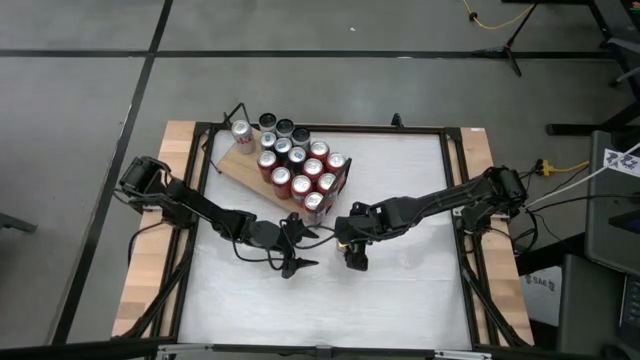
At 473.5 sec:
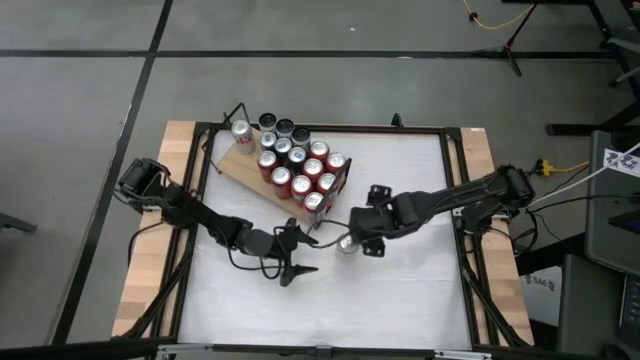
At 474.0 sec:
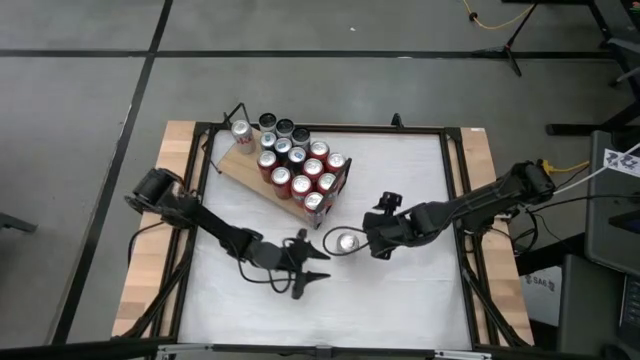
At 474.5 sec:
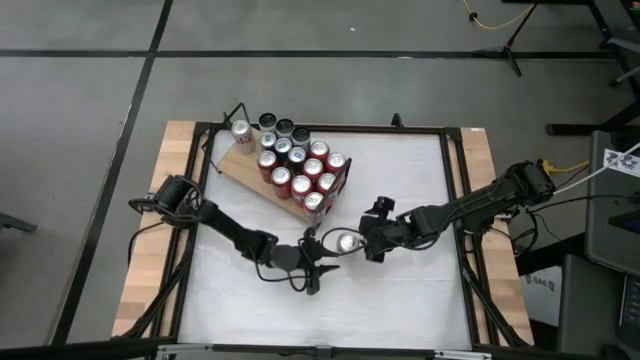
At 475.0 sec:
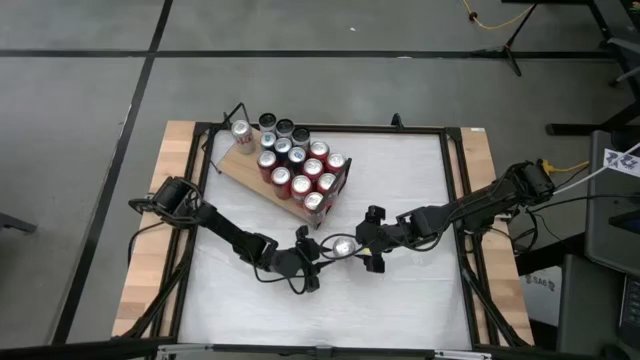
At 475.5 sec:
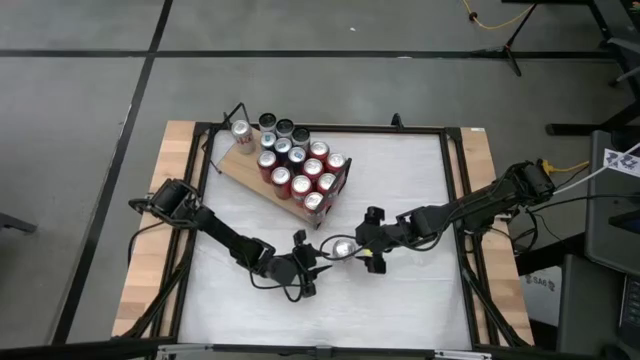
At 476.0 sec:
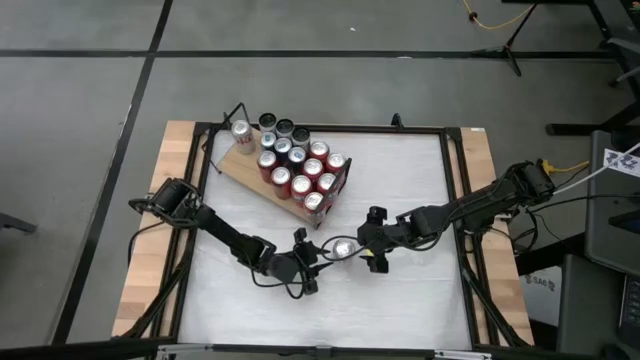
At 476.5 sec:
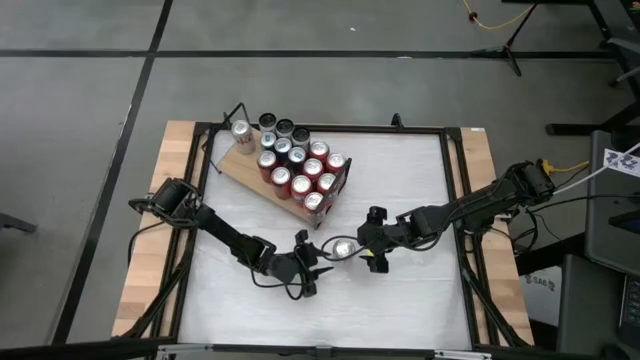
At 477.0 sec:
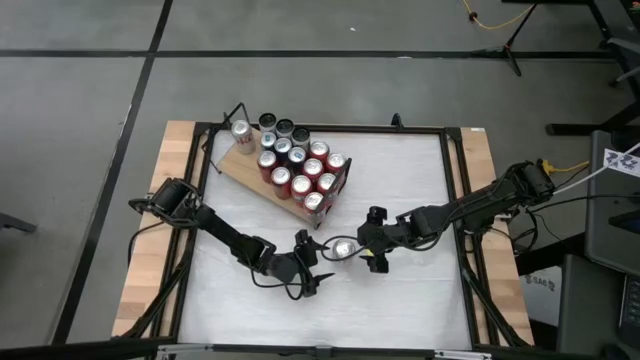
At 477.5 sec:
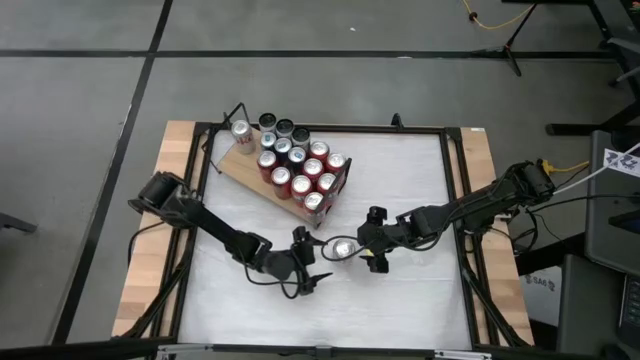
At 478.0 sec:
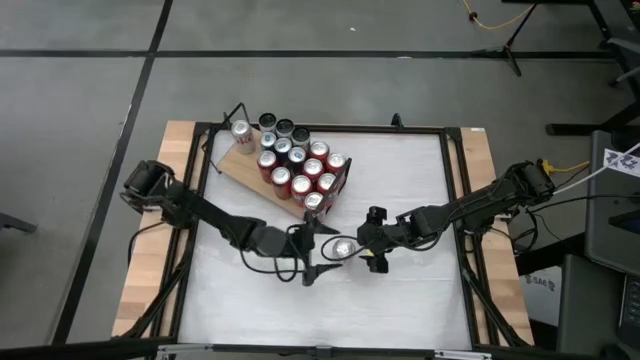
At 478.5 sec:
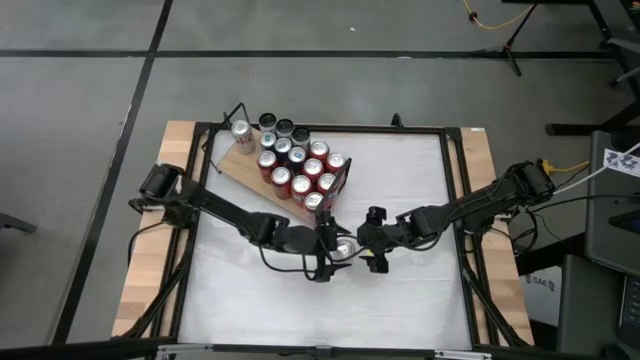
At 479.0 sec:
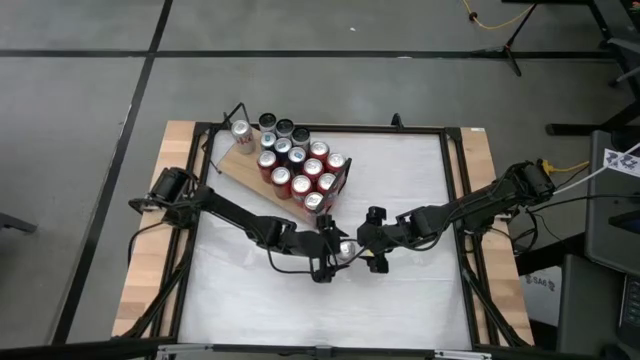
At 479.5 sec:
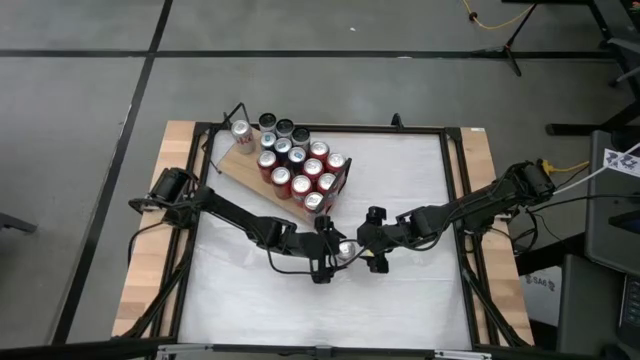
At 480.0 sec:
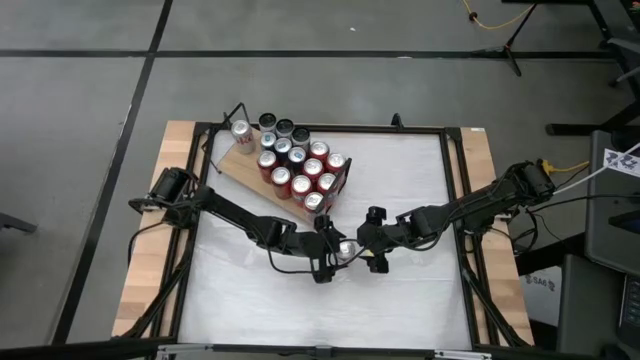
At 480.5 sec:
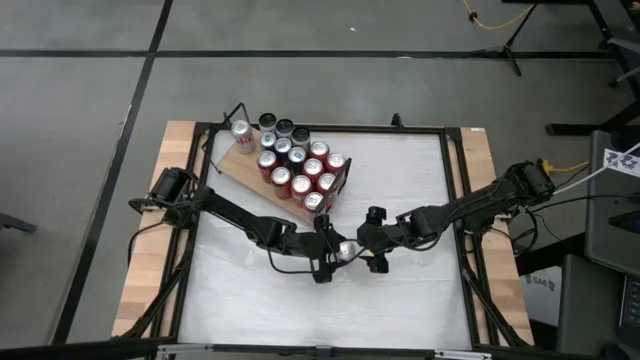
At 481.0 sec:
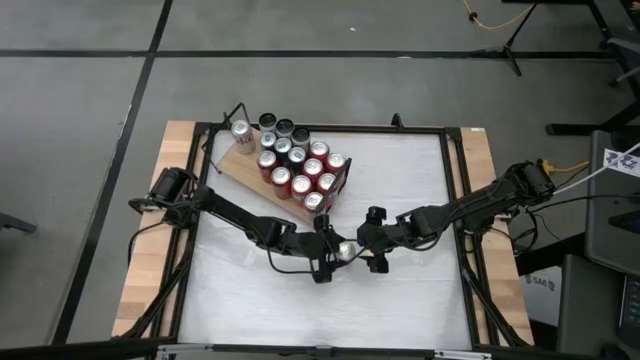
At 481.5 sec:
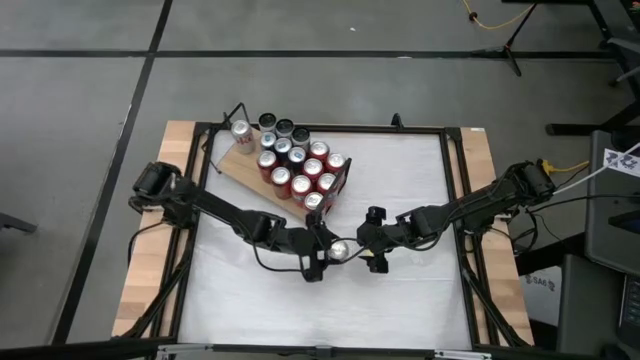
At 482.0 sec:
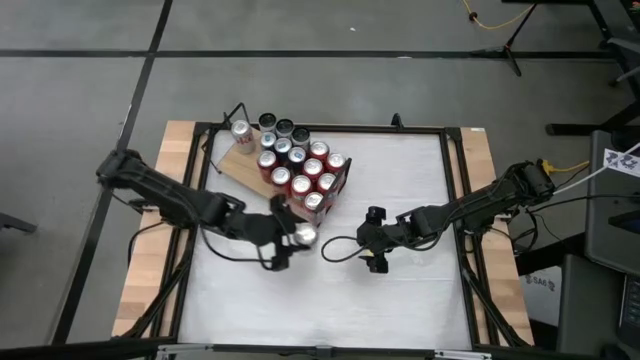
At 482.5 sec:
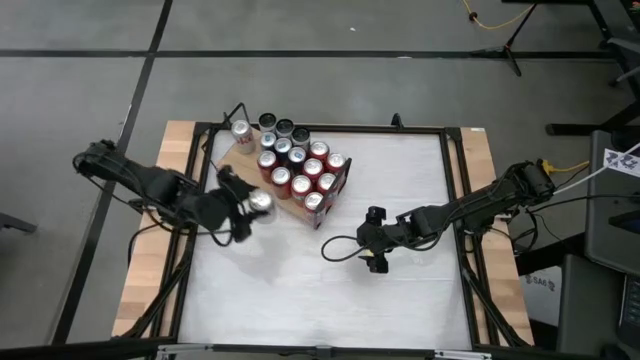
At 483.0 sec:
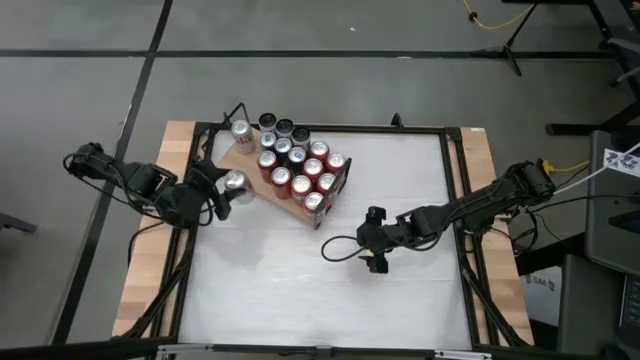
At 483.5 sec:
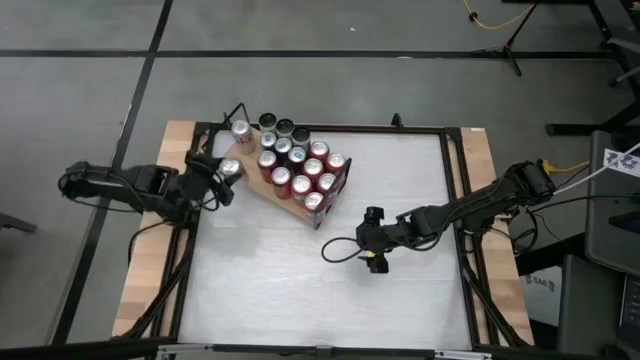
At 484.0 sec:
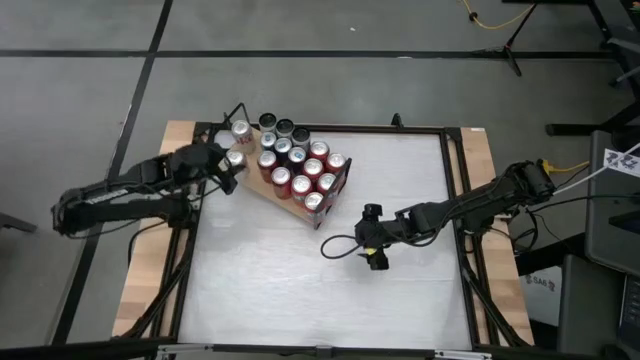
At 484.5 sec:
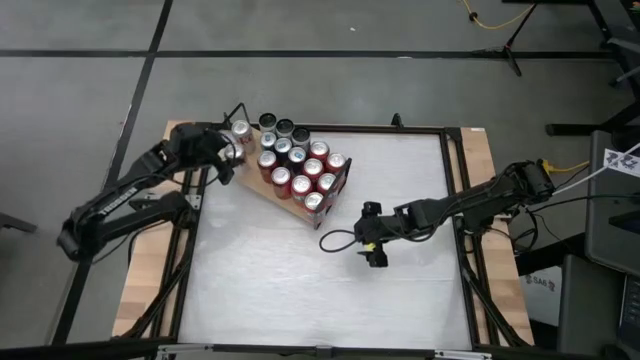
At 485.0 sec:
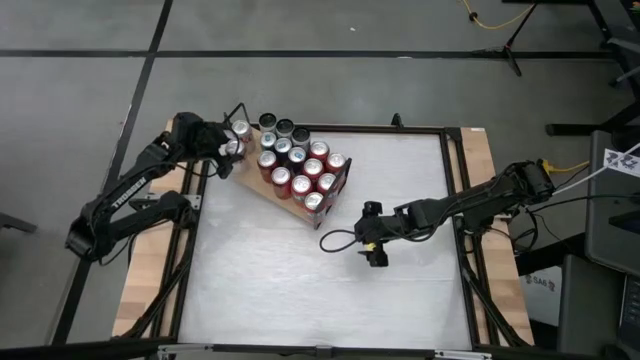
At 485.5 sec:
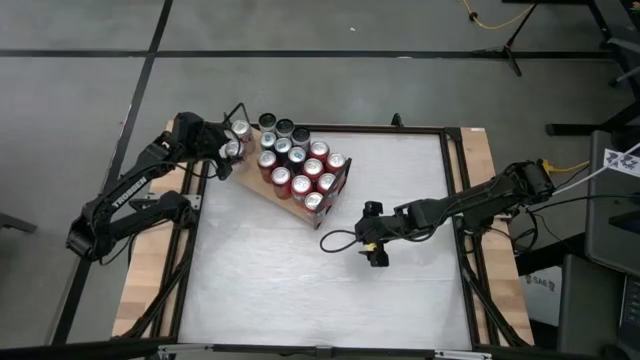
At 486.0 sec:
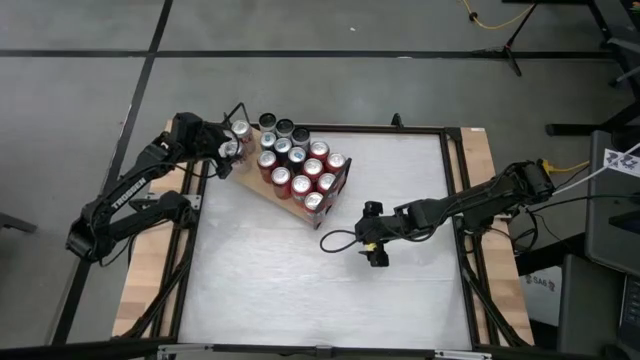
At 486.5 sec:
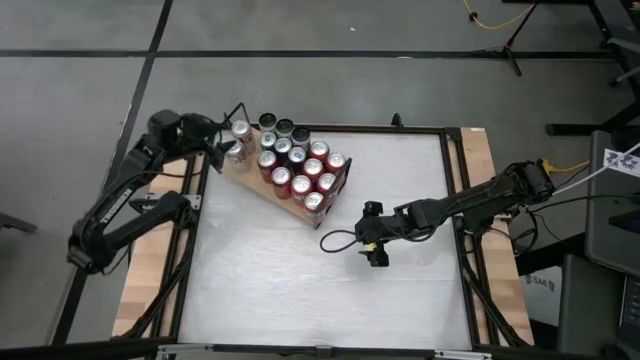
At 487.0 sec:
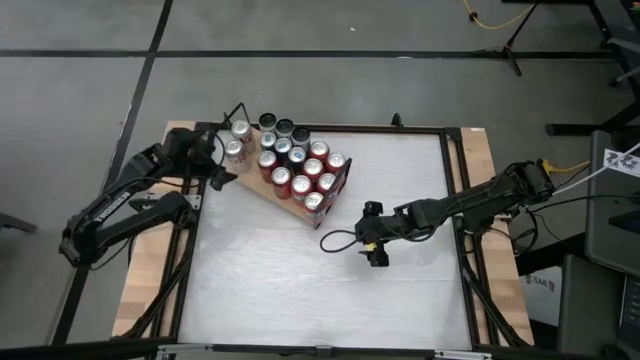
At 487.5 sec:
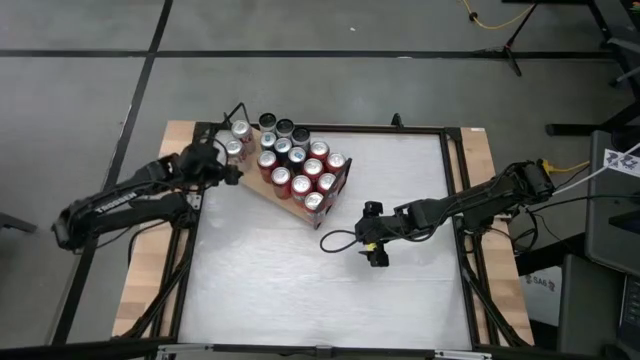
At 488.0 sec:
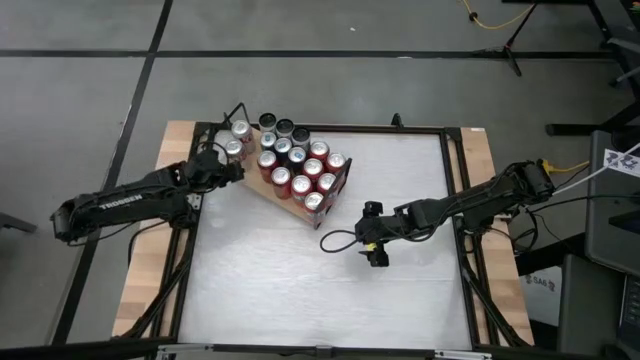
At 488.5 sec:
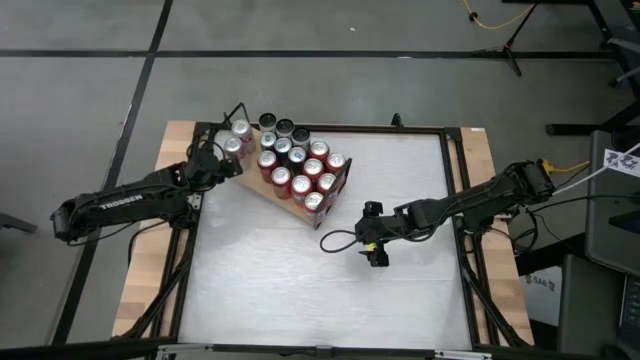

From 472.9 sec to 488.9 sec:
Task: Pick and place cans onto a shelf
Put the red/silver soda can on the shelf and align with the other red/silver soda can

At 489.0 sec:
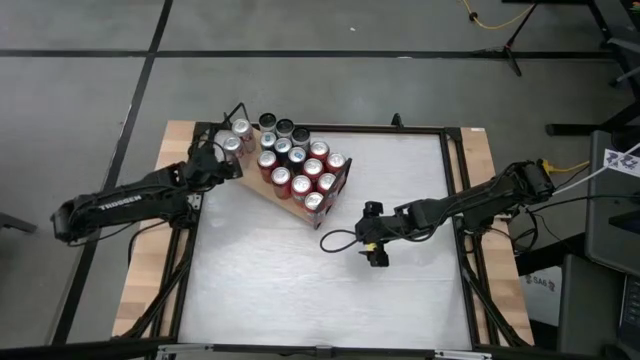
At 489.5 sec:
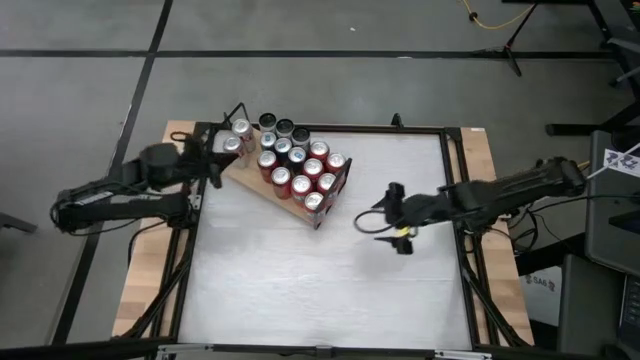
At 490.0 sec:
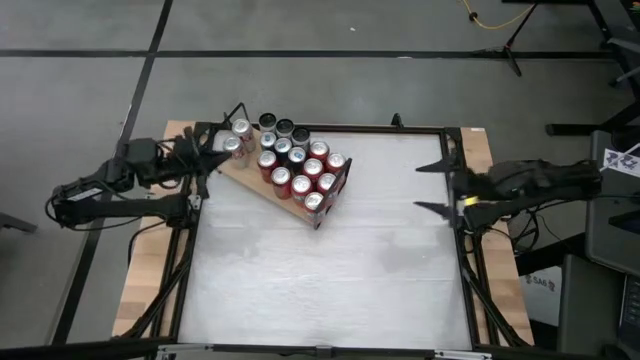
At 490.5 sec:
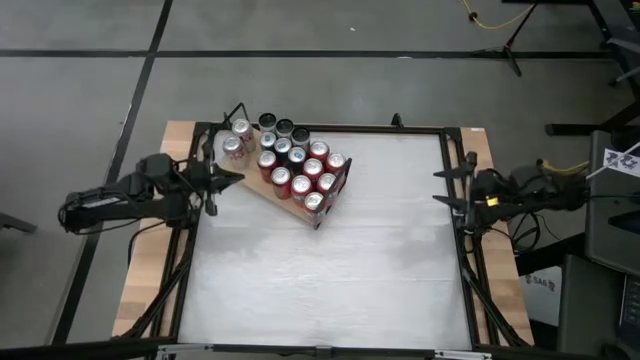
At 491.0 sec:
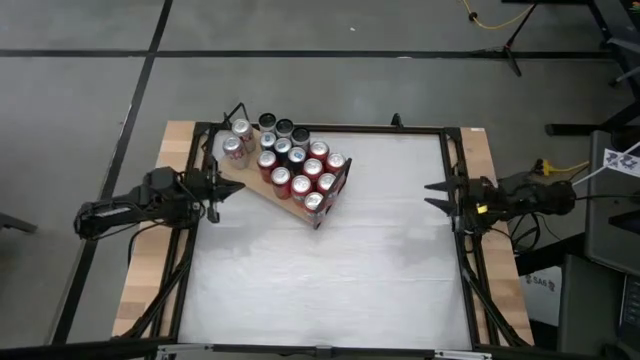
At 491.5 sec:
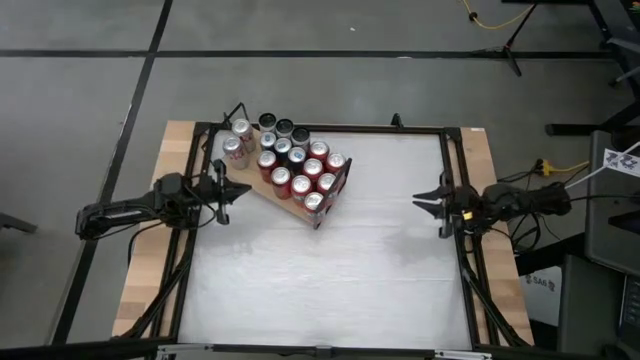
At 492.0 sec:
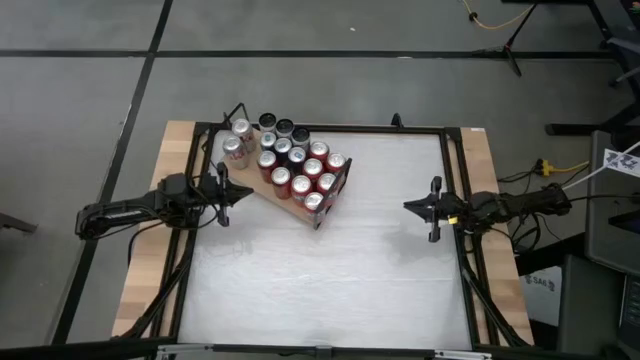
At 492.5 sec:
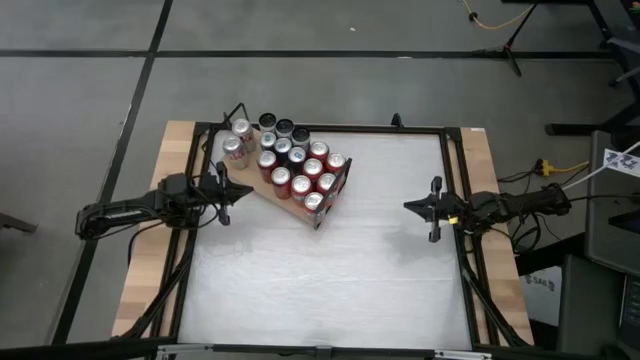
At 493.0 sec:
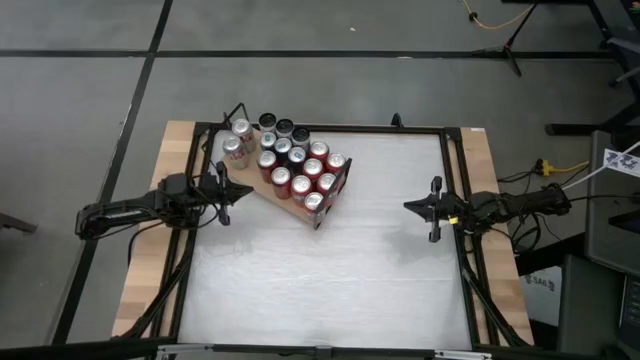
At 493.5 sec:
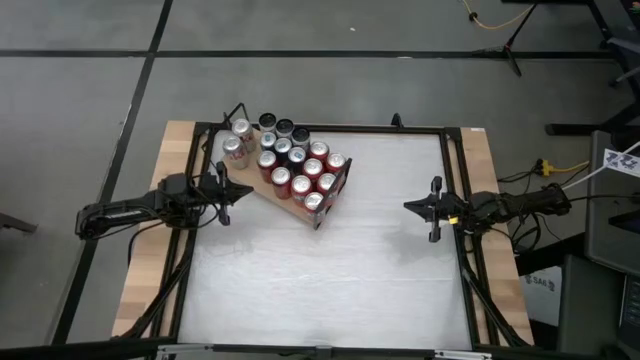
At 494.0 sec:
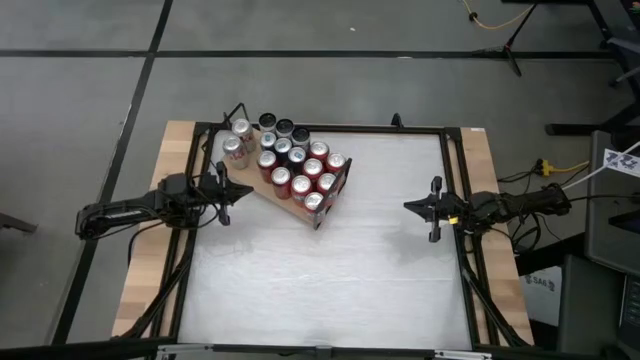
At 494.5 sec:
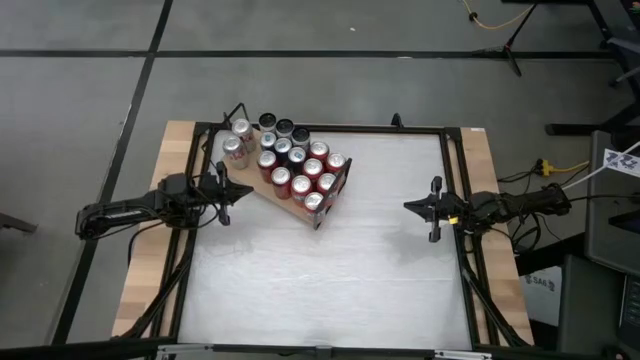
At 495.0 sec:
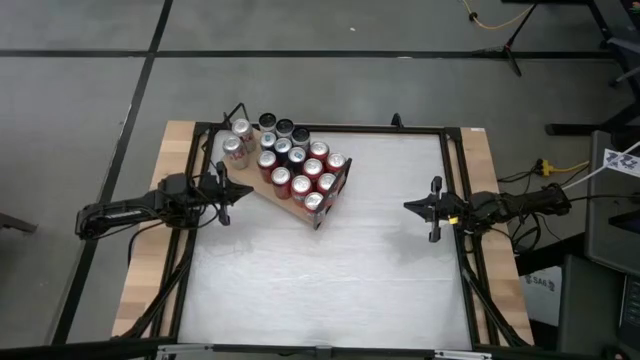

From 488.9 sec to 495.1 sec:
Return to Home Position
